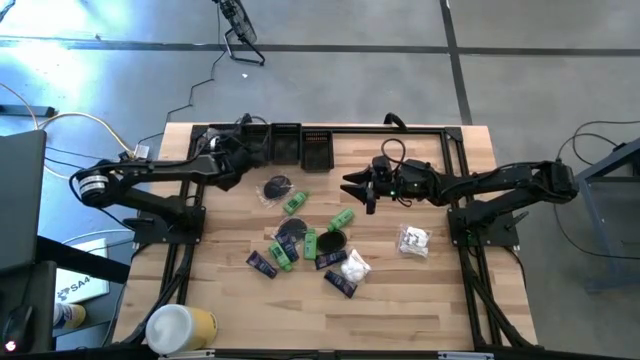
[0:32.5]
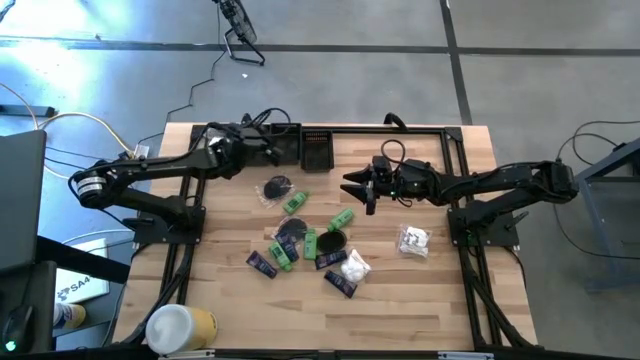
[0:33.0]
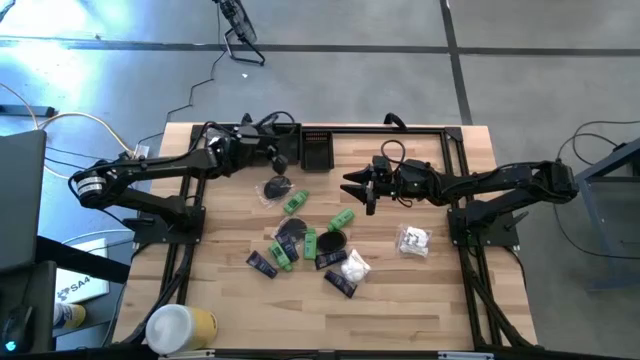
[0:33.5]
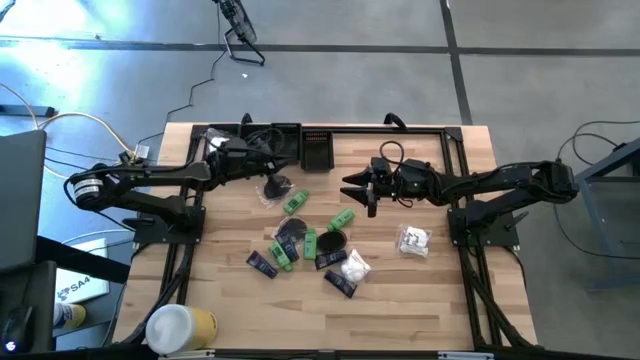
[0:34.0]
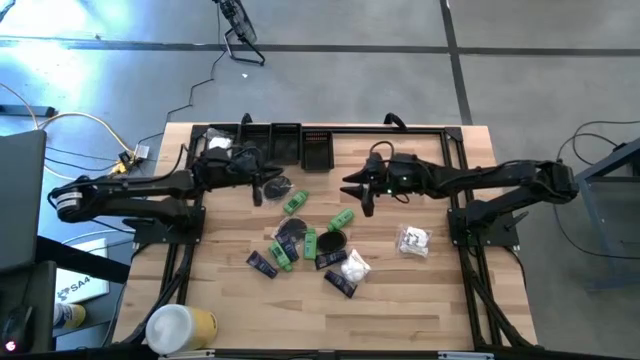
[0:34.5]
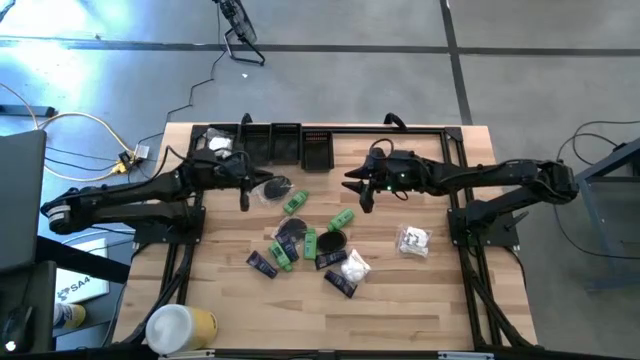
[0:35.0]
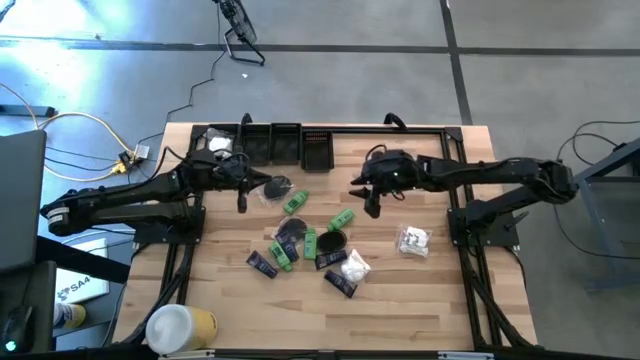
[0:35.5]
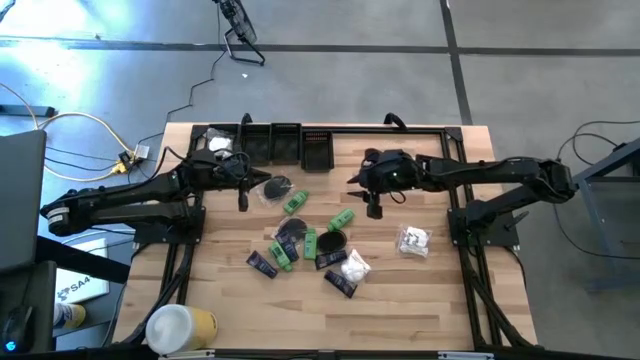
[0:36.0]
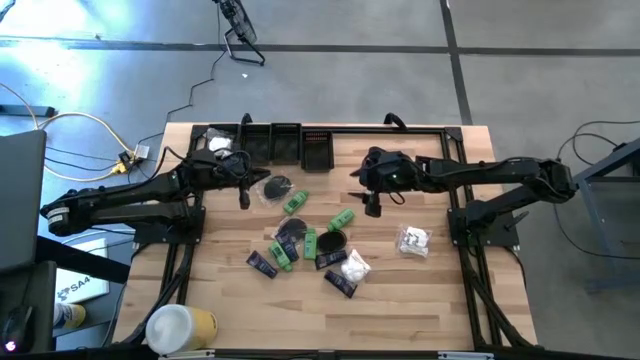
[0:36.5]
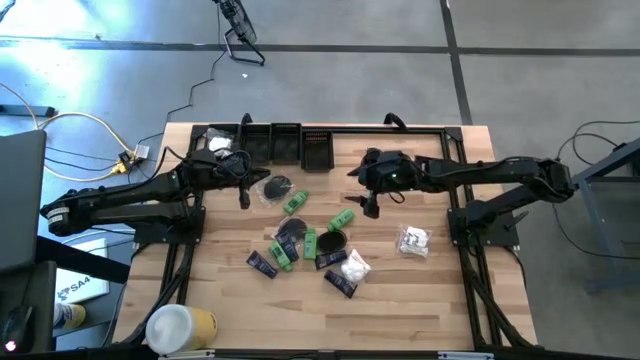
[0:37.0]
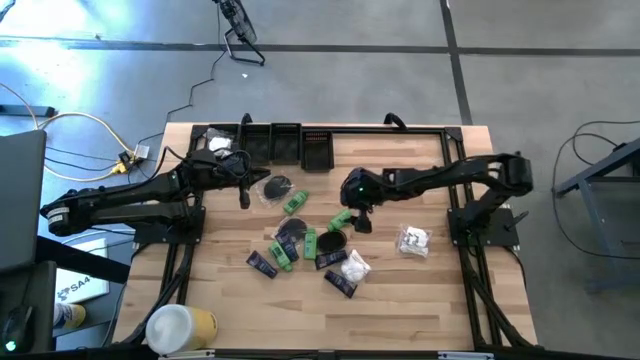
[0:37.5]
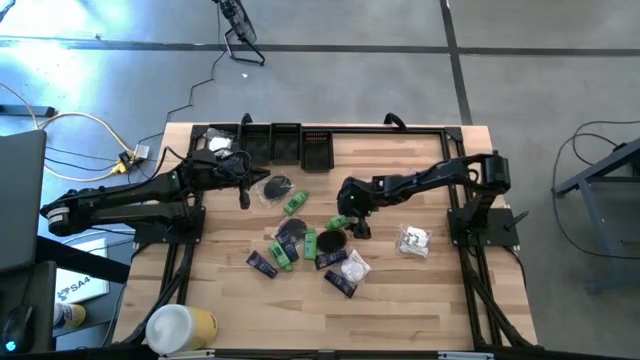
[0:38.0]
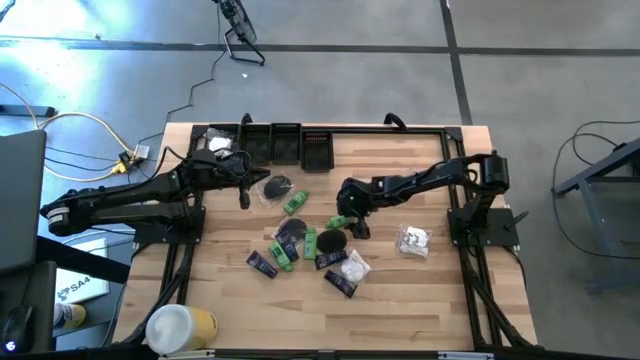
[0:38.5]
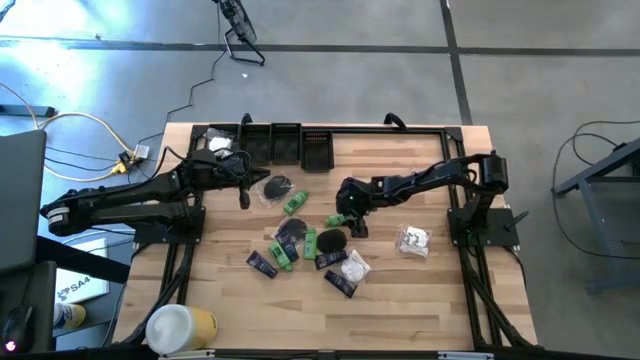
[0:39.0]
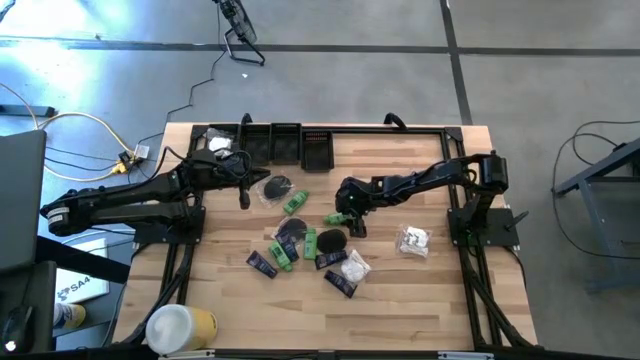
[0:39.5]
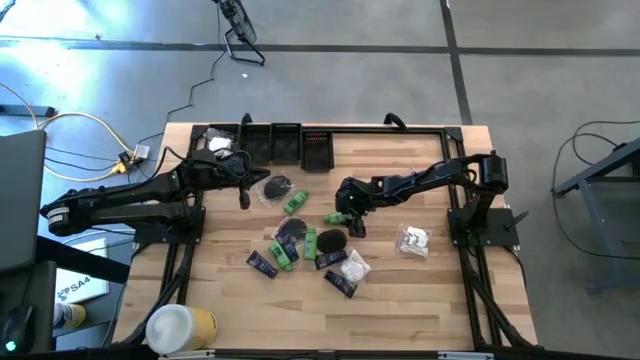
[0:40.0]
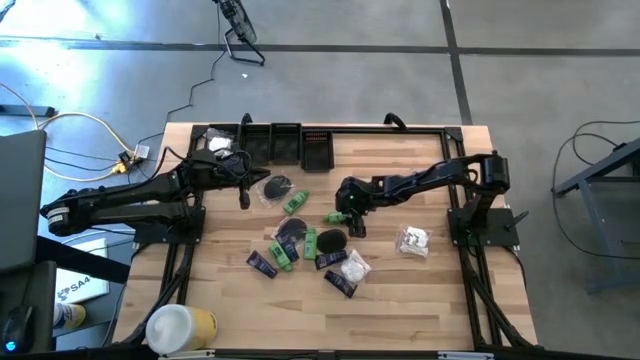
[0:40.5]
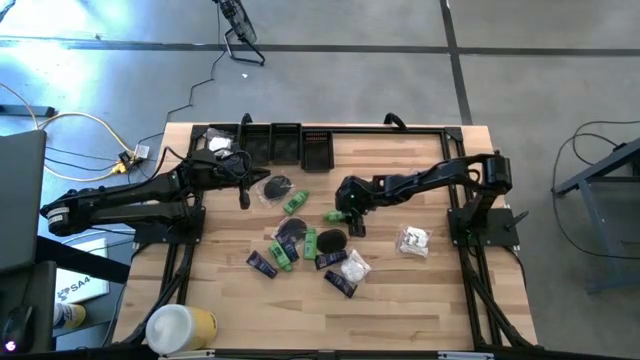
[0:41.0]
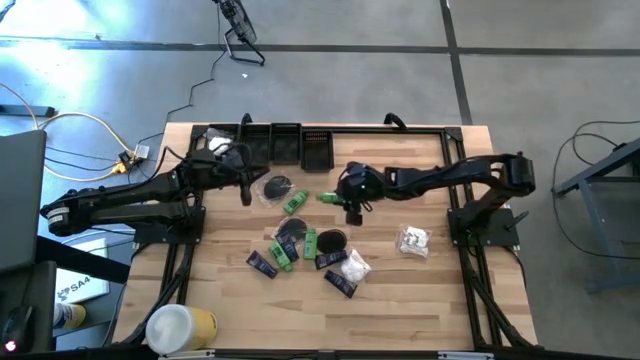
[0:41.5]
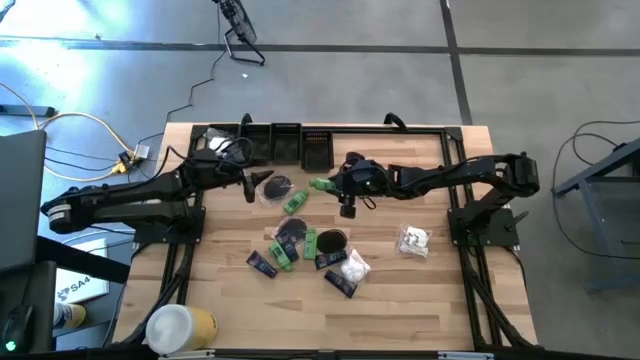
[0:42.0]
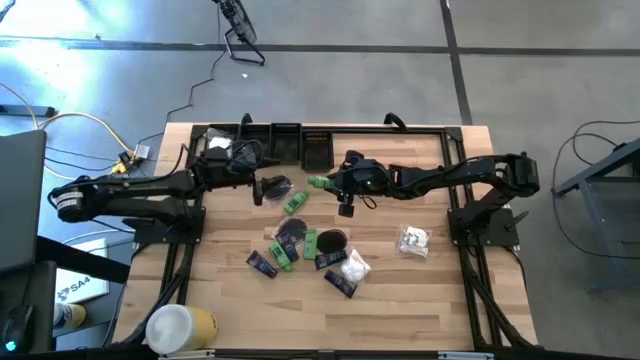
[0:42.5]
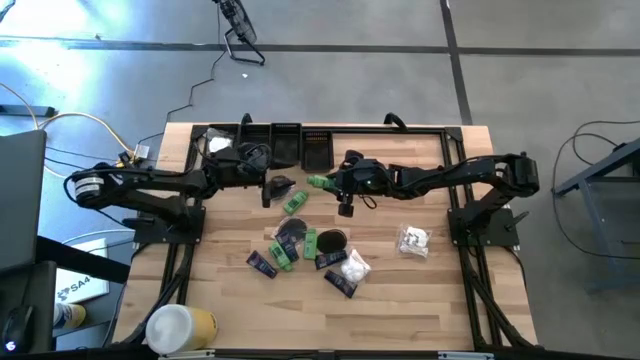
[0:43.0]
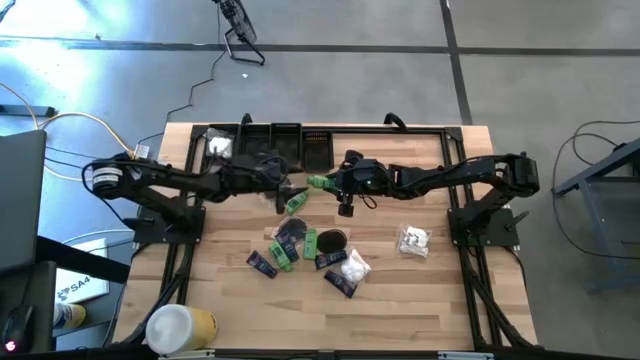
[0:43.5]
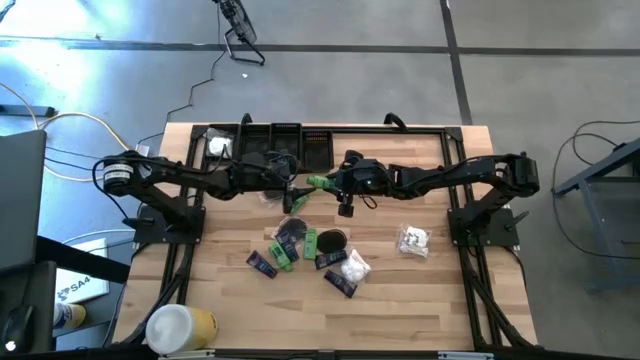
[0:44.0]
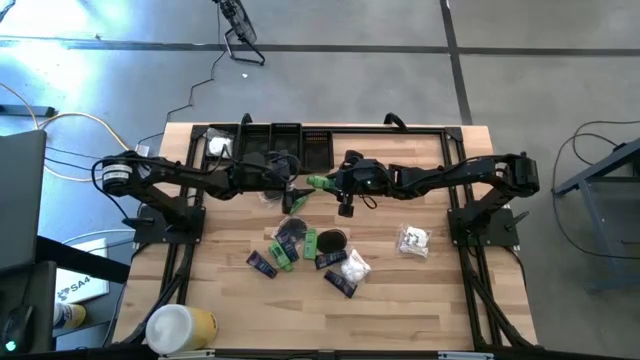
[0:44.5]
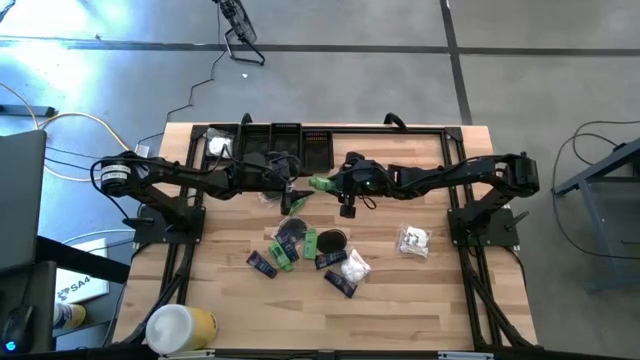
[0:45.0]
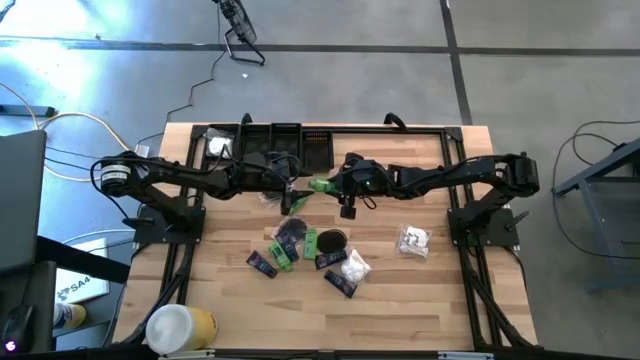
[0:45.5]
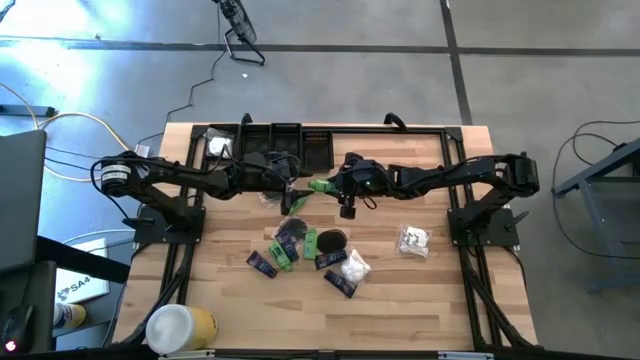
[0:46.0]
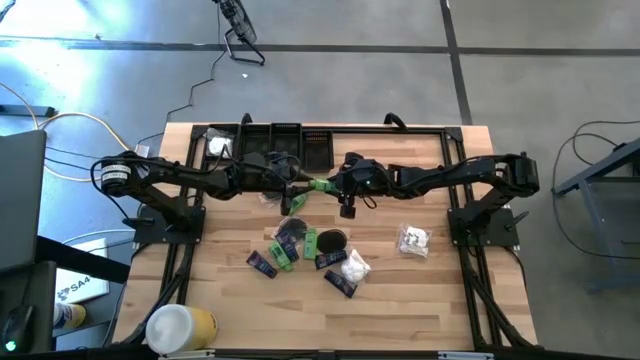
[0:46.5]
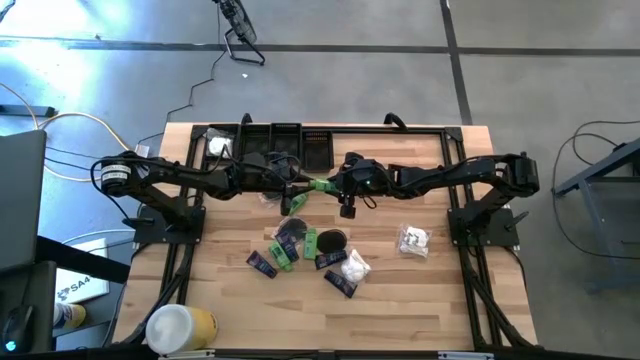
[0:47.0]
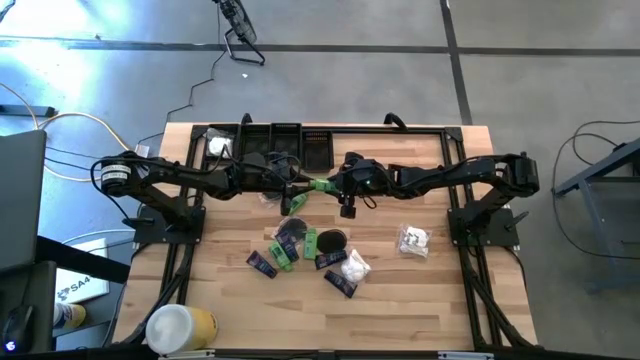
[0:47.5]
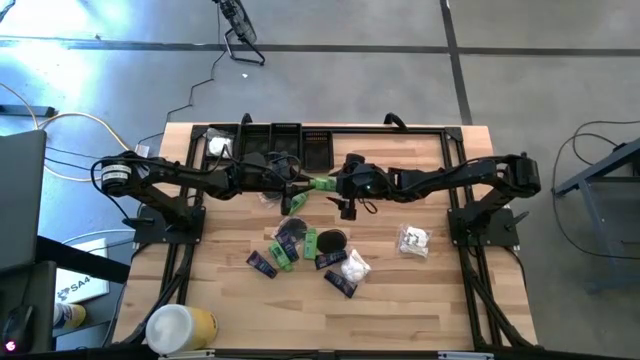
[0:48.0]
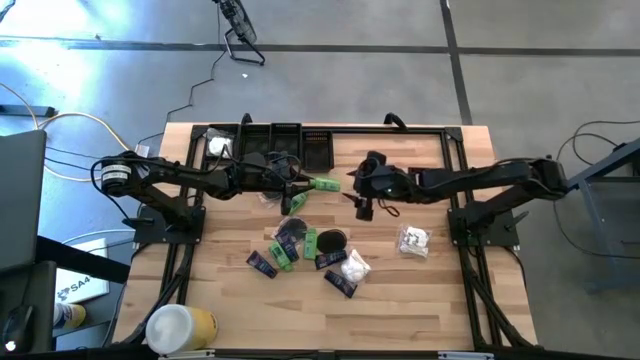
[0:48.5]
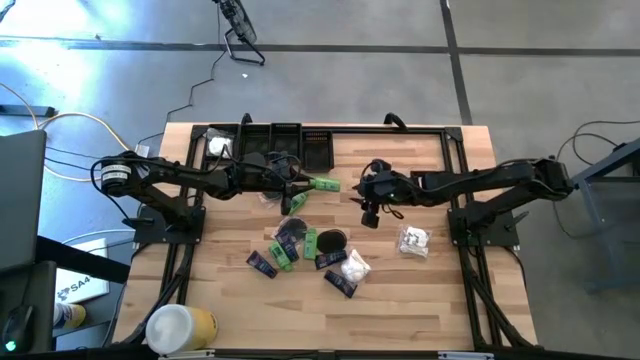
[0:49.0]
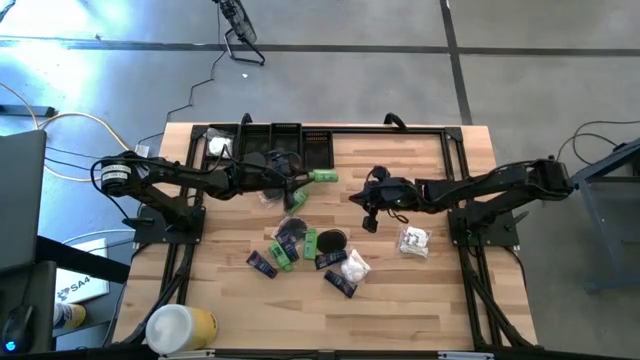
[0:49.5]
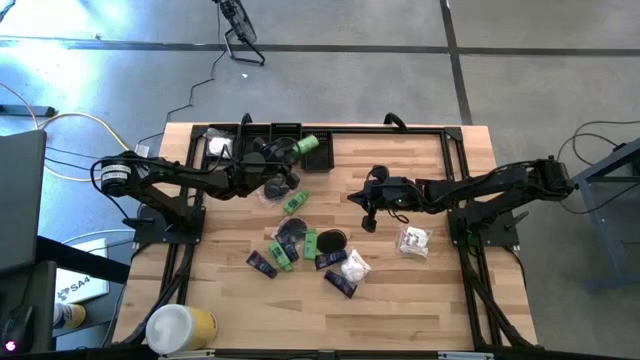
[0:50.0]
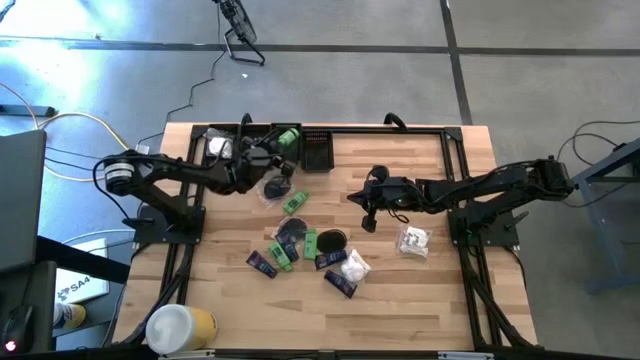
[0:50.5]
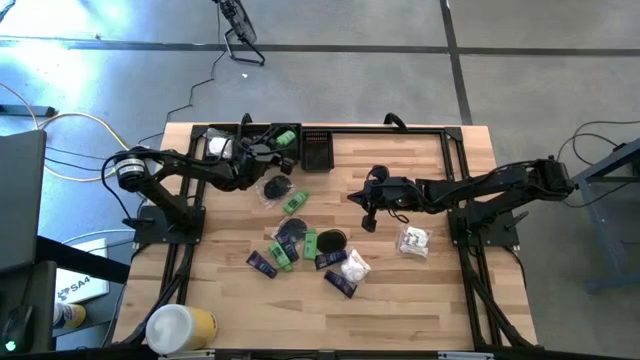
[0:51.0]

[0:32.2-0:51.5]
Task: Pick & Place Travel size toiletries
Put the shampoo into the middle right black bin

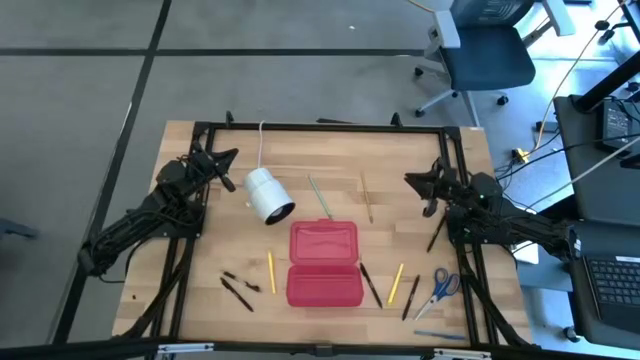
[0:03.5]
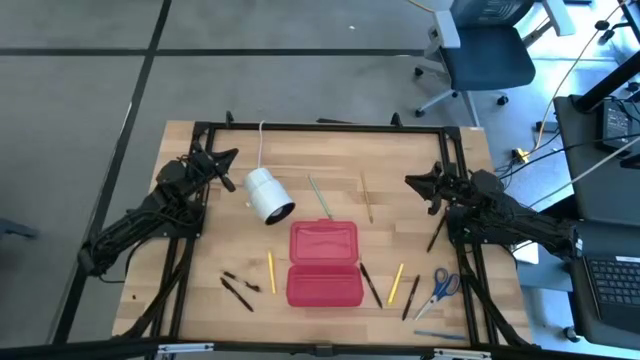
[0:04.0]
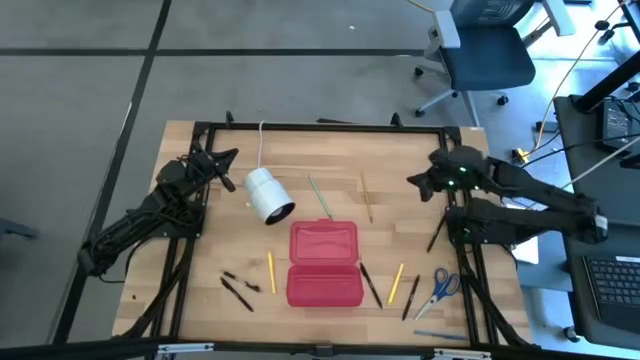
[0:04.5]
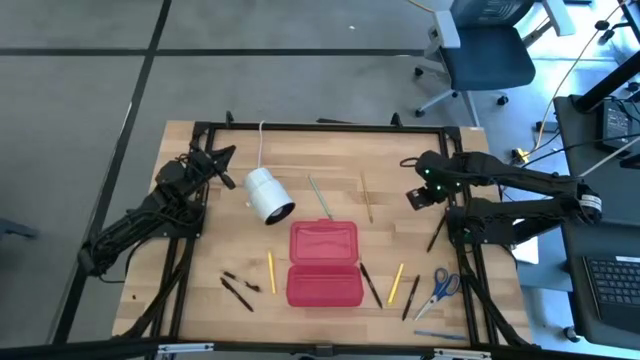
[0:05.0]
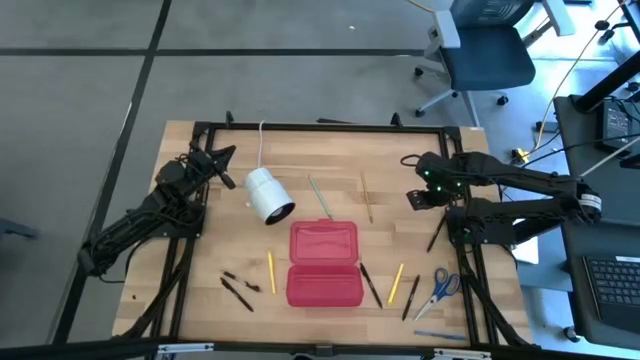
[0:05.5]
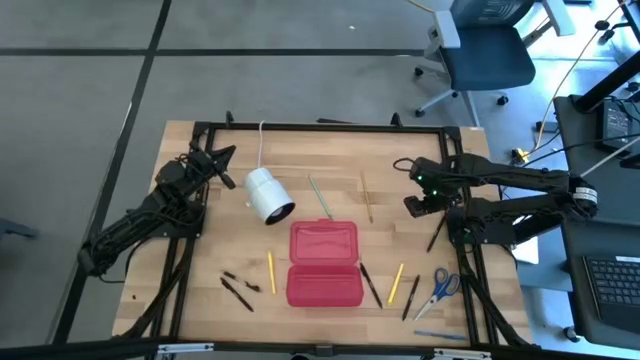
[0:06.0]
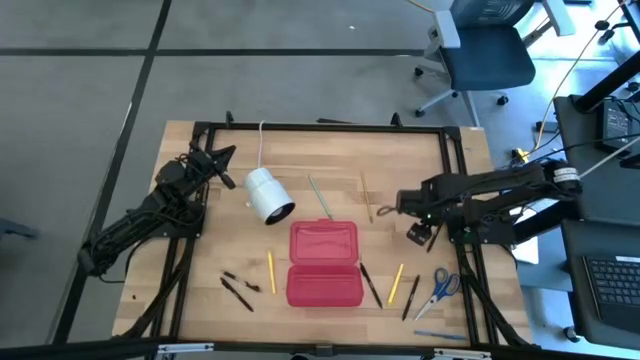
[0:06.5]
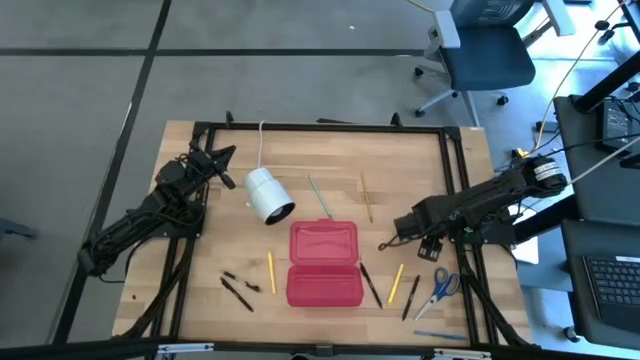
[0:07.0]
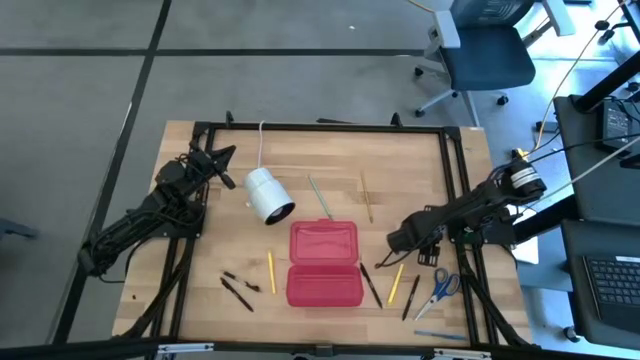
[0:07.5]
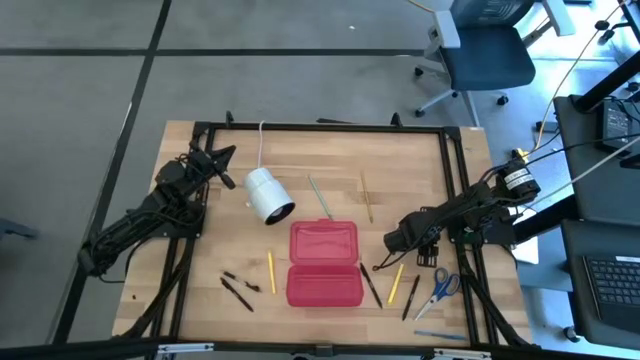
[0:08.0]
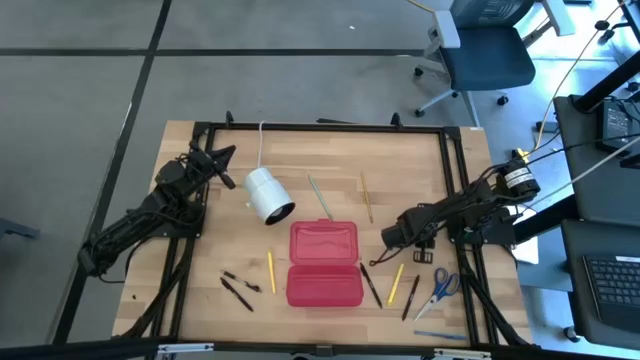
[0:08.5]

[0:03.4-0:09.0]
Task: Pick & place school supplies into a supply box
Put the black pen into the pink supply box
